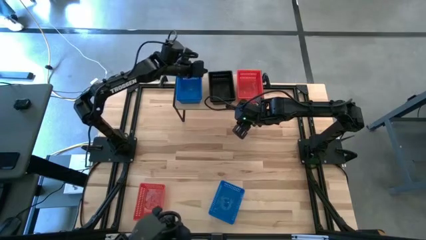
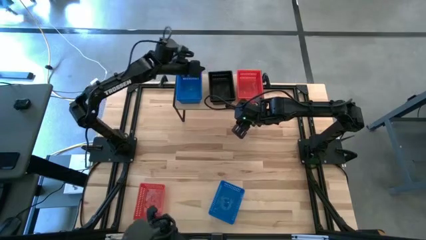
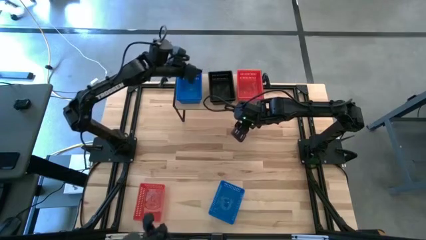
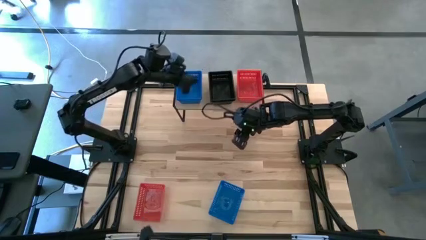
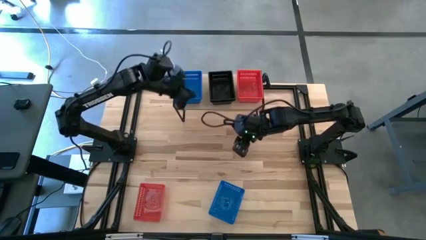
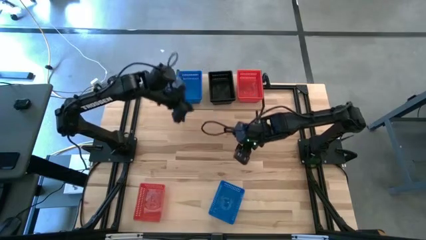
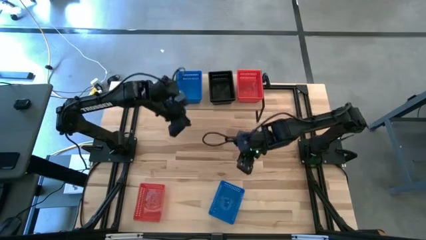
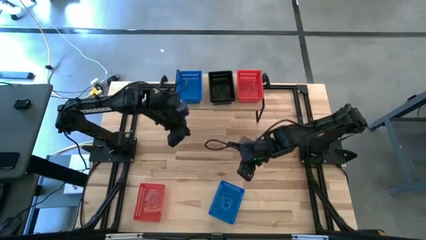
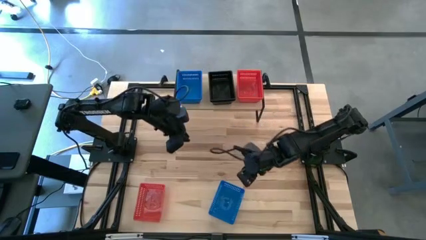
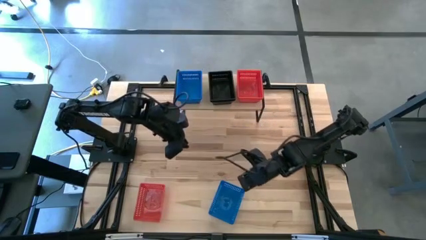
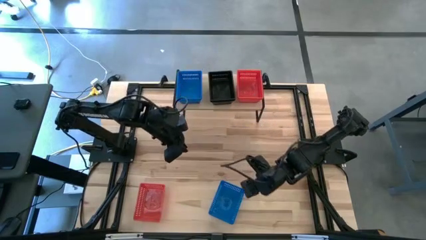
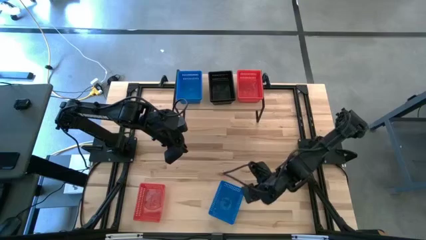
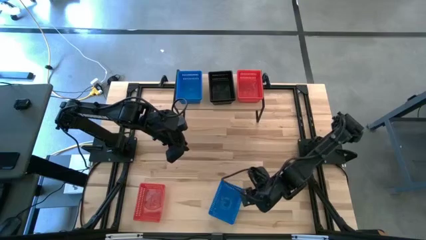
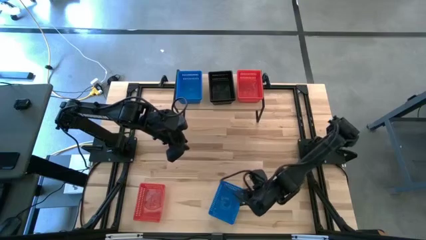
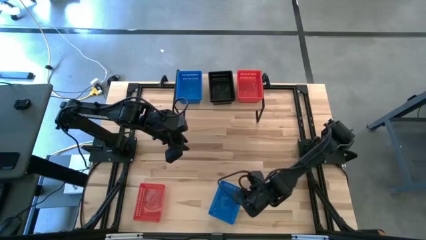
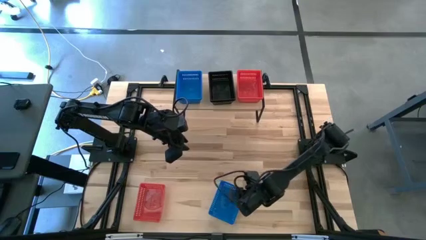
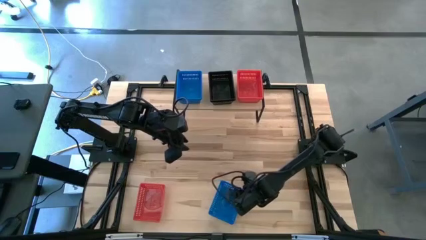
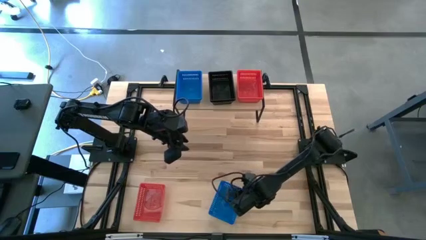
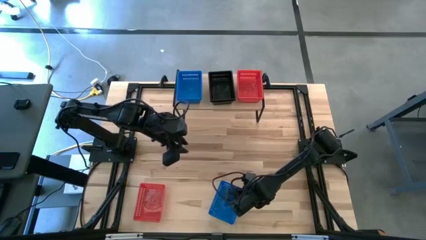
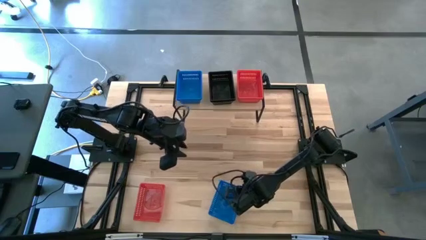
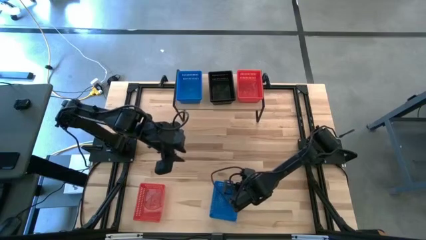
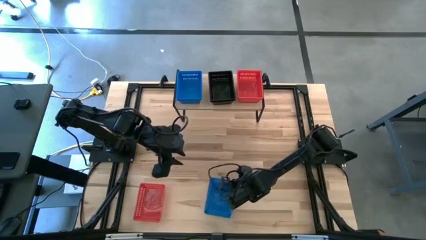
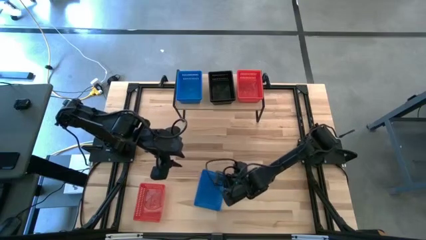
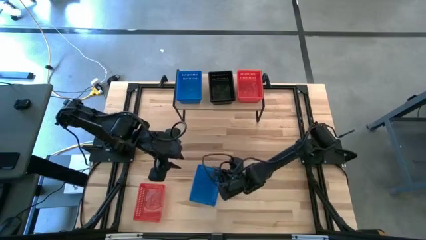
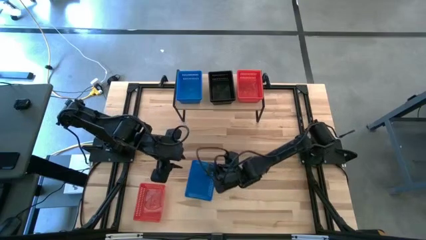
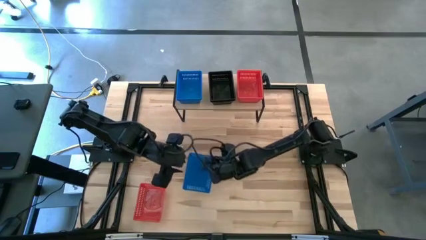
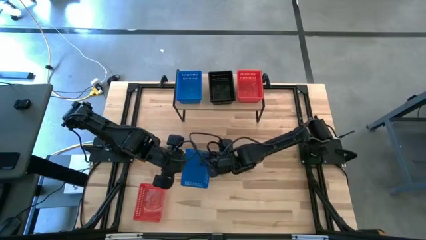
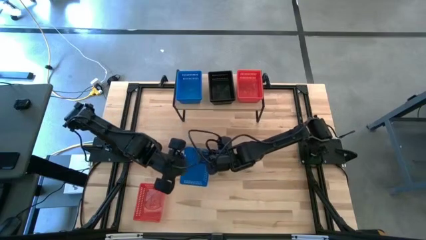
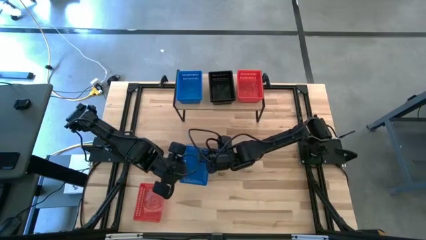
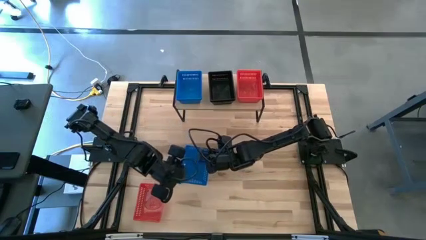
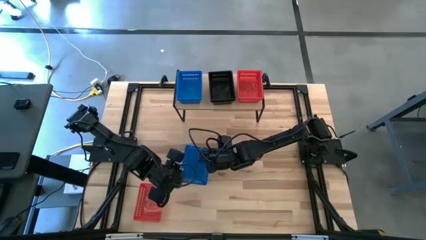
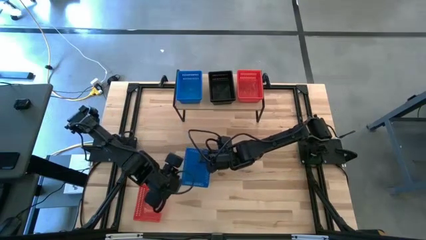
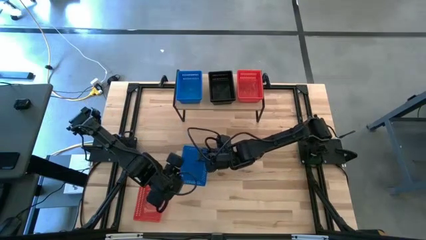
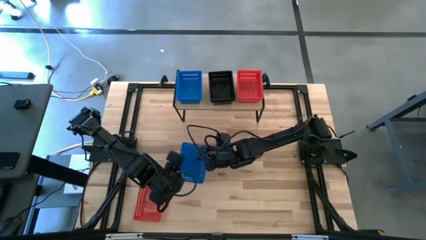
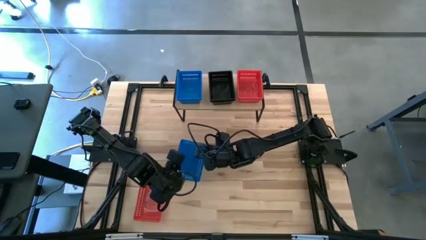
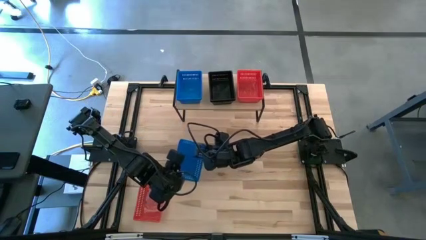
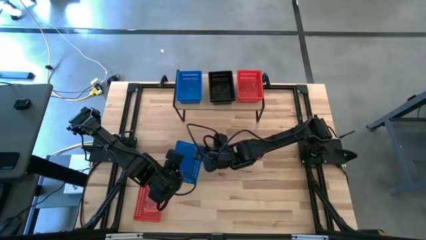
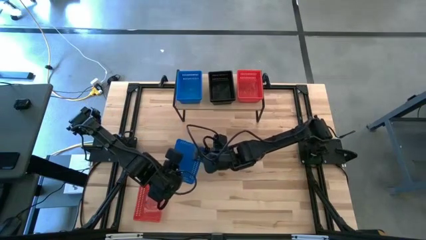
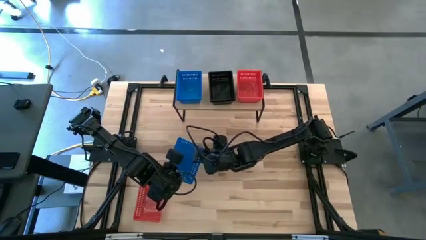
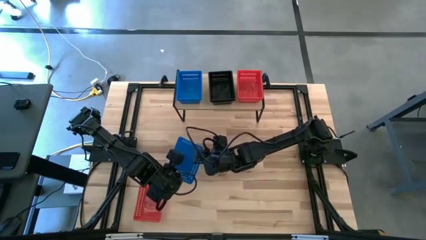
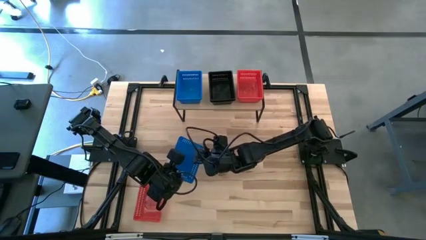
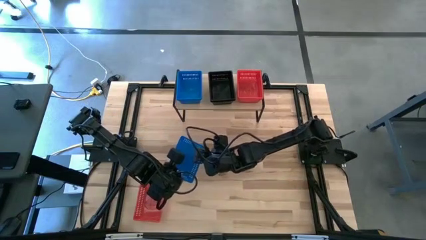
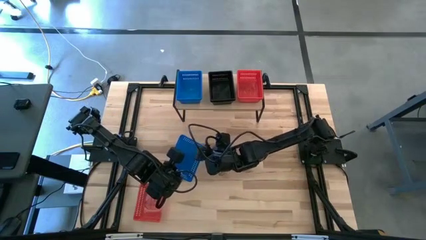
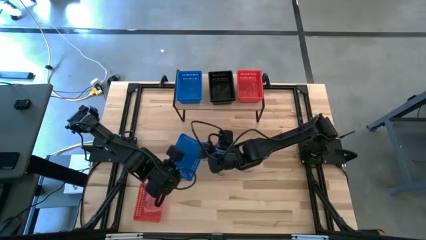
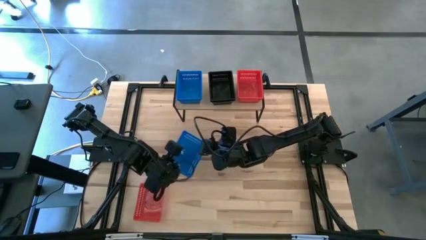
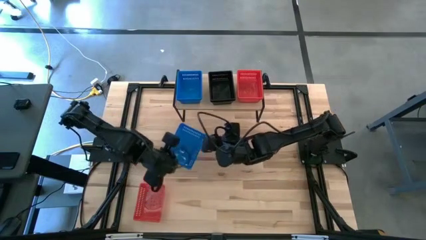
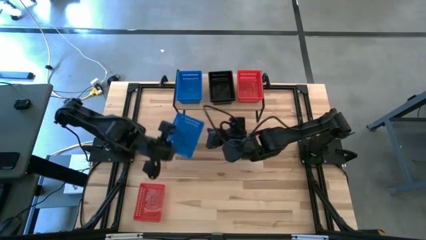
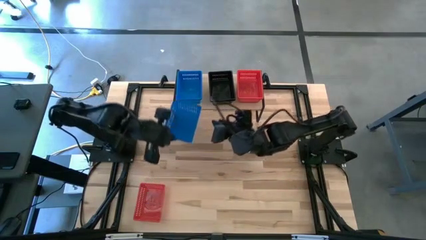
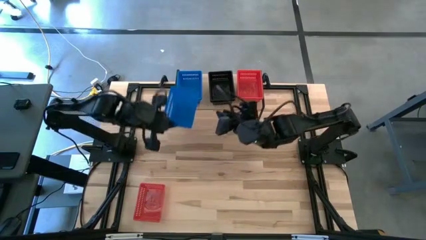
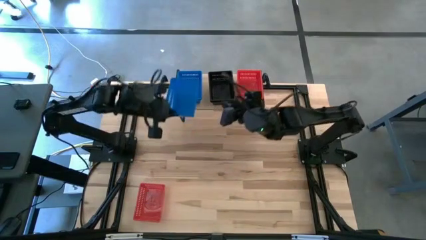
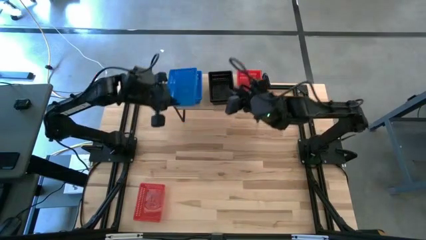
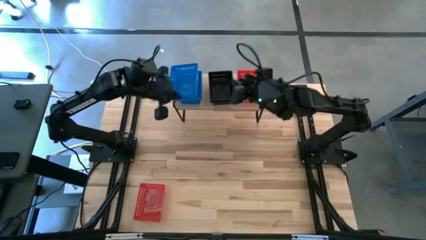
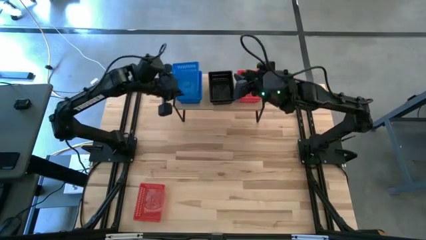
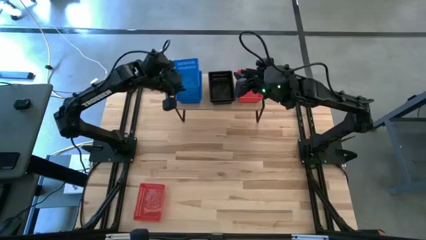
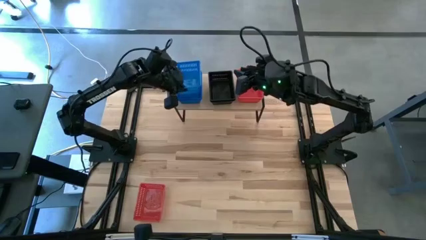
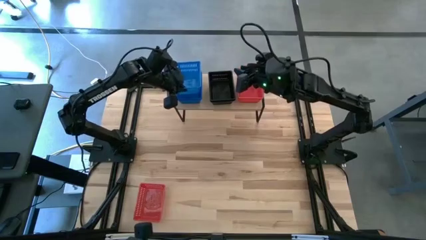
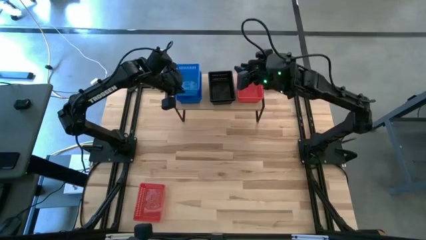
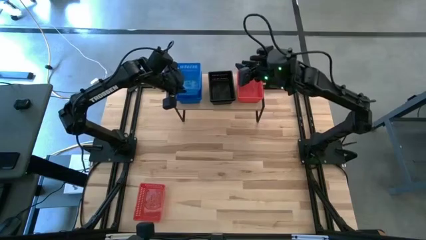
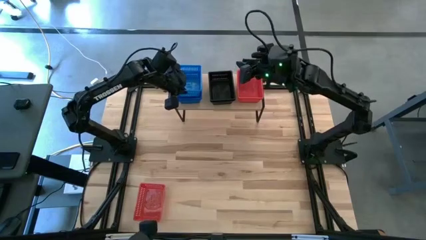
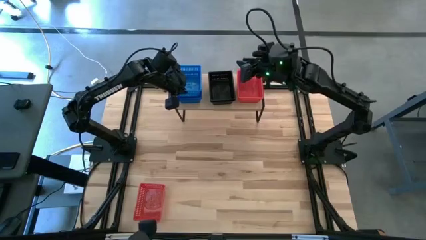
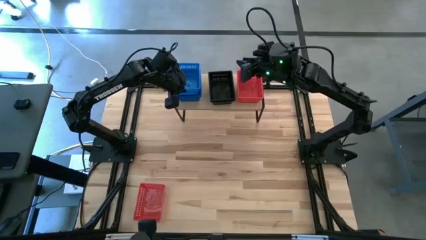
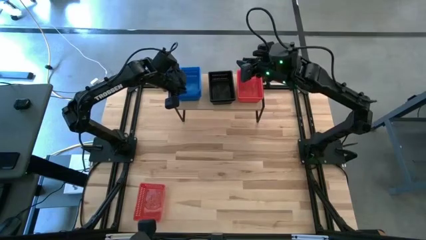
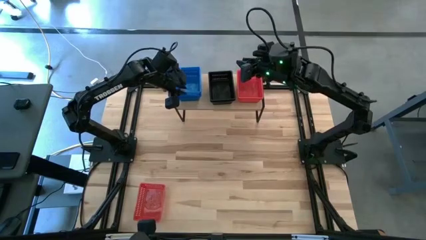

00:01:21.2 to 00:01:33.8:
Task: Stack baskets on shelf by color
Stack the blue bin on top of the other blue bins on the shelf
